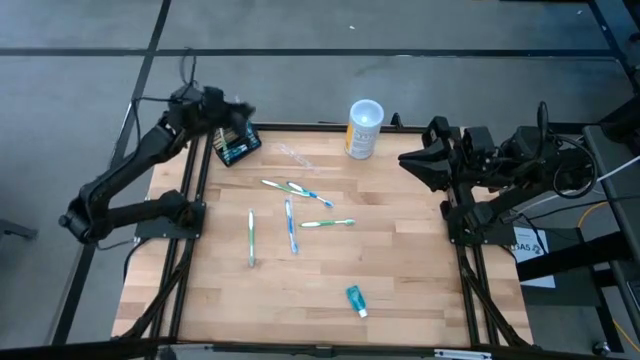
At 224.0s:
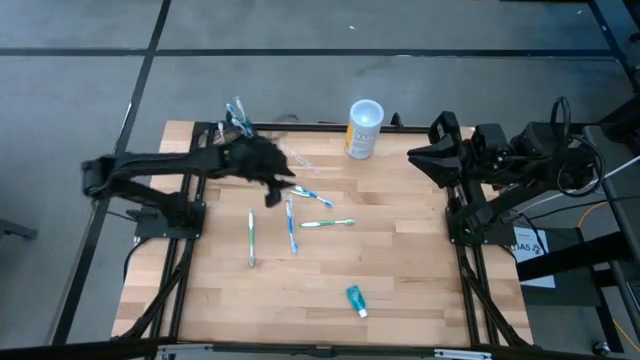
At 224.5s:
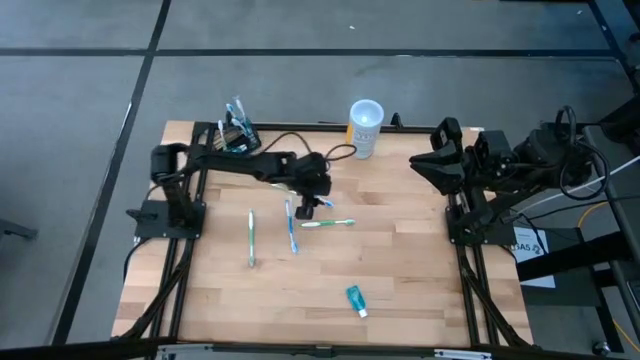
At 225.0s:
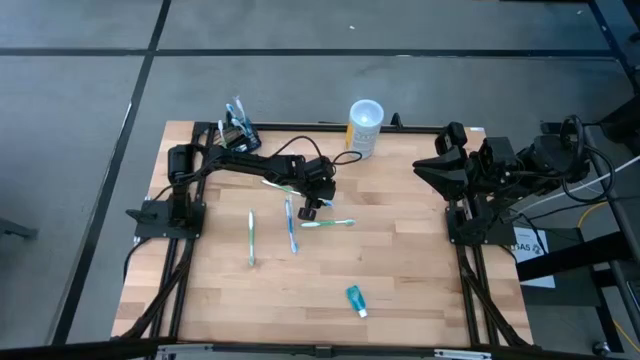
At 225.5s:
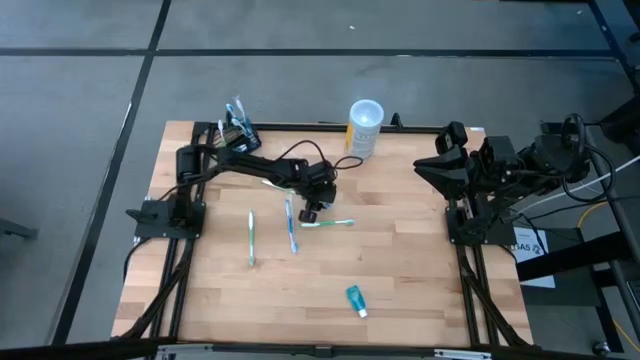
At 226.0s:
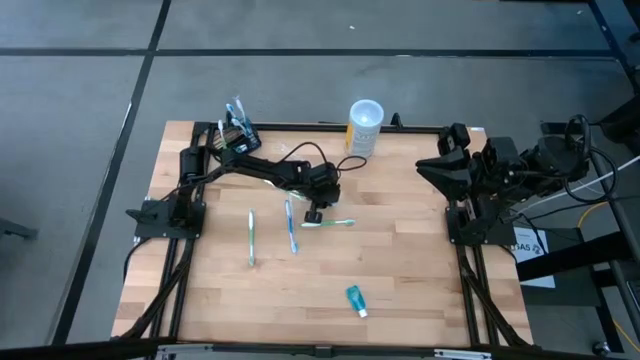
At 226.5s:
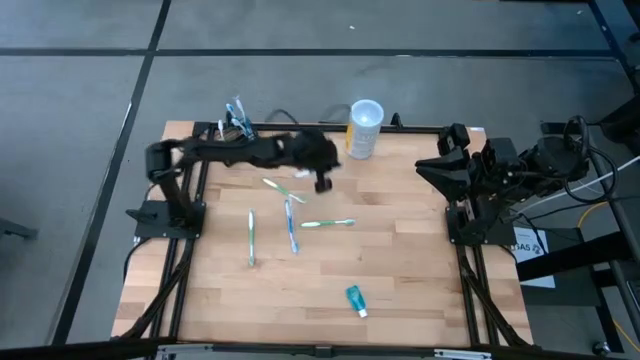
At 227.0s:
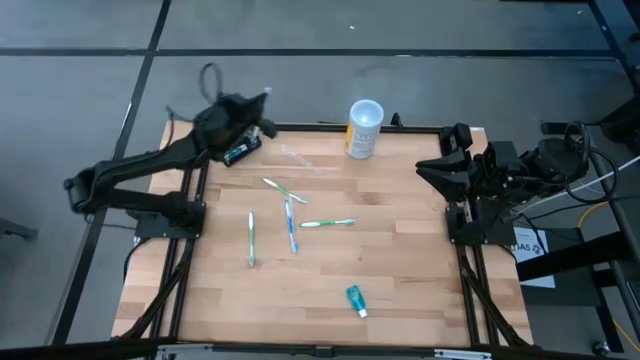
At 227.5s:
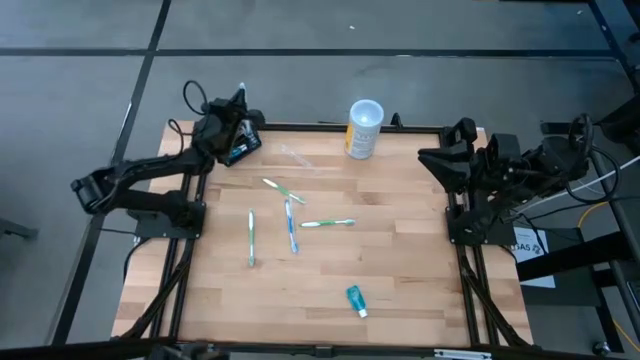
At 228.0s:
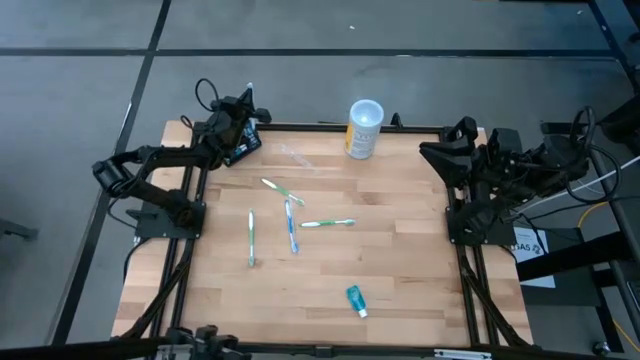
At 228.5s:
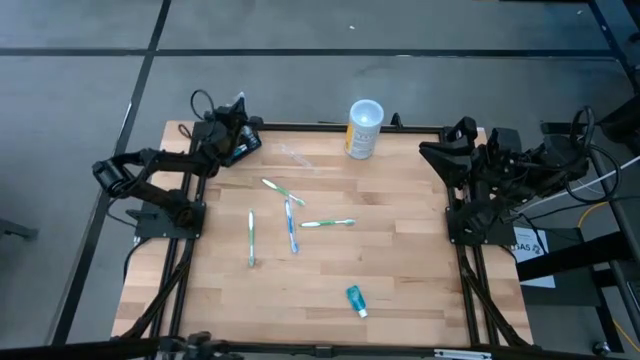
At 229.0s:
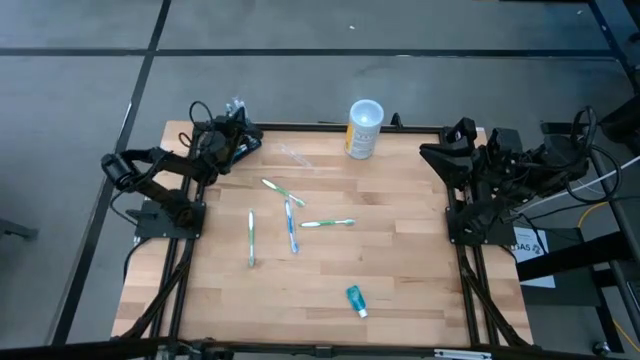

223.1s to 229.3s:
Task: Pick & Place toothbrushing station
Put the blue toothbrush into the right section of the black organizer

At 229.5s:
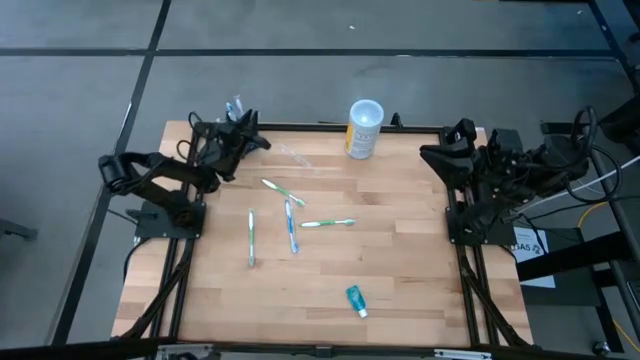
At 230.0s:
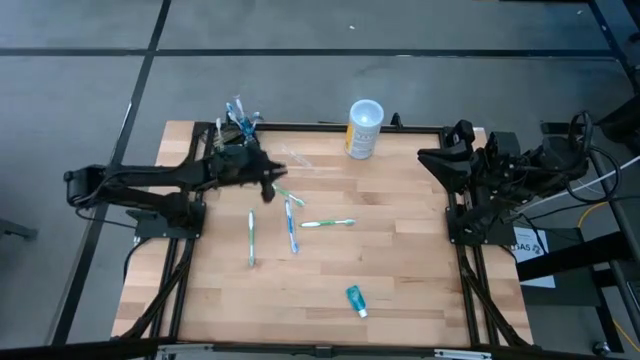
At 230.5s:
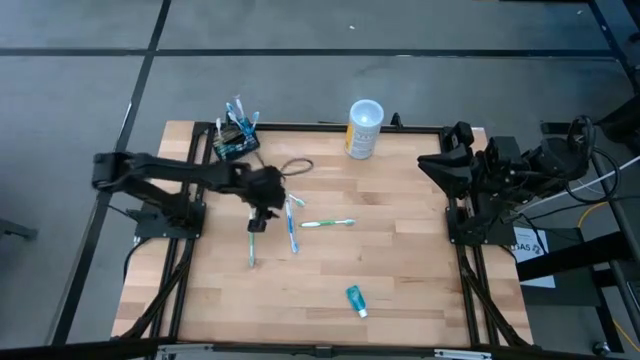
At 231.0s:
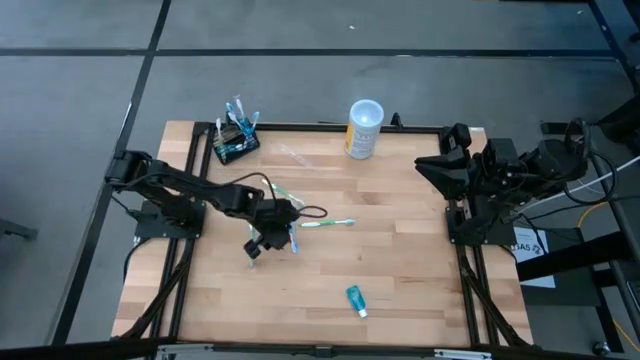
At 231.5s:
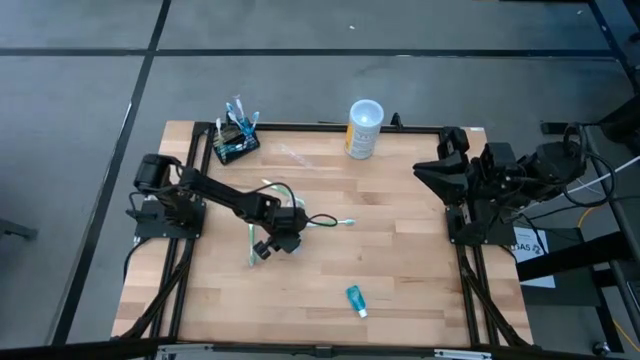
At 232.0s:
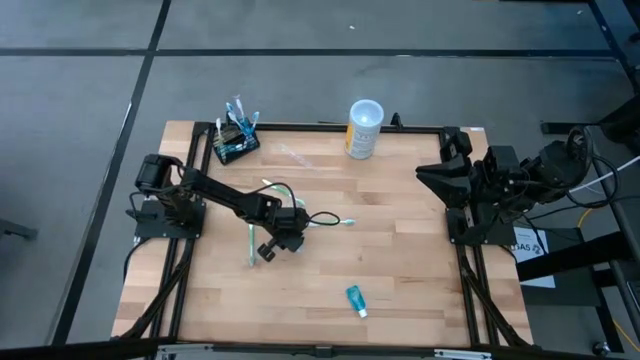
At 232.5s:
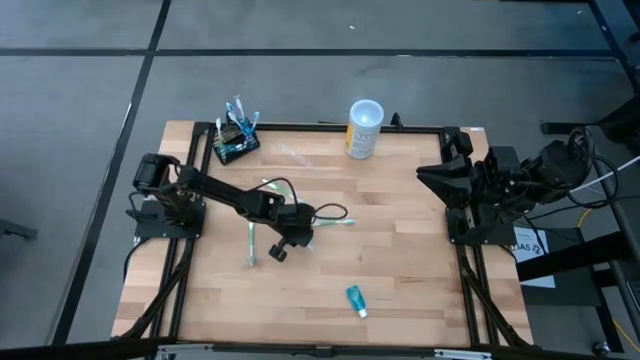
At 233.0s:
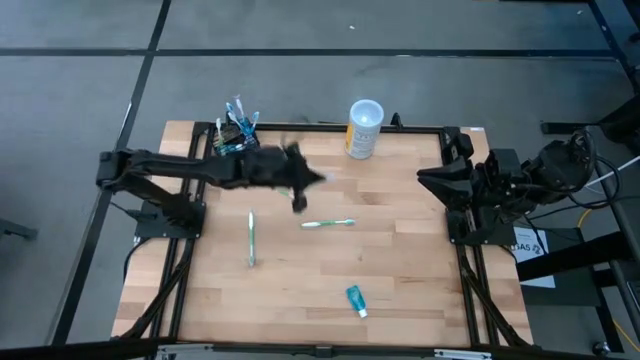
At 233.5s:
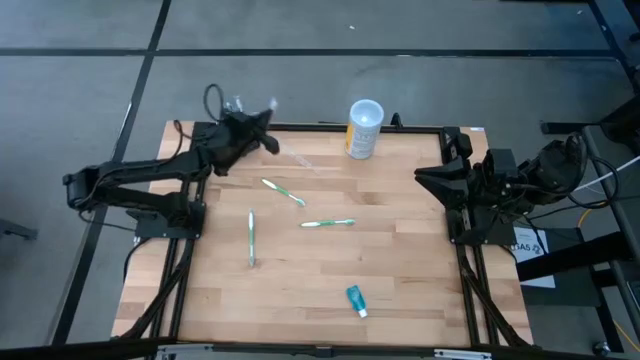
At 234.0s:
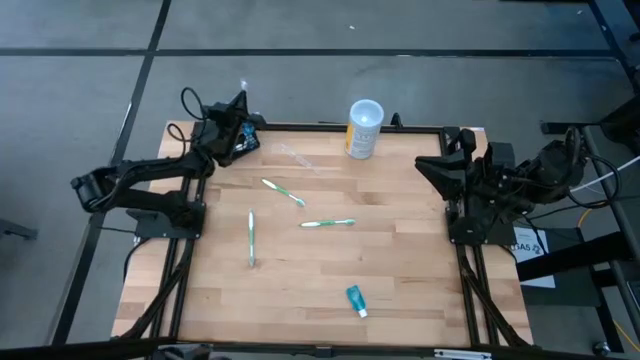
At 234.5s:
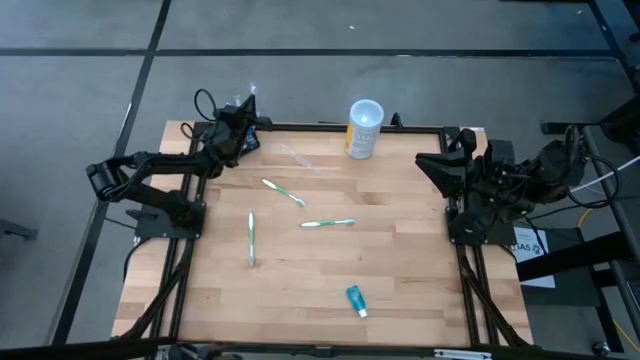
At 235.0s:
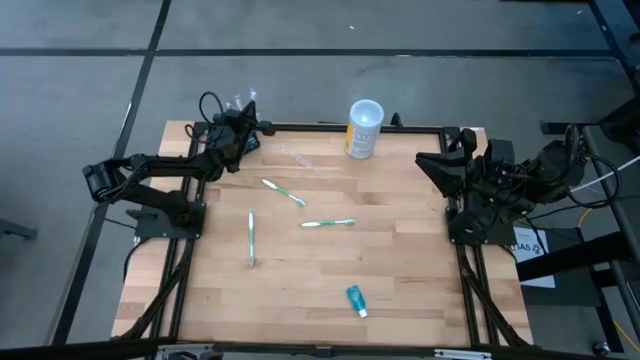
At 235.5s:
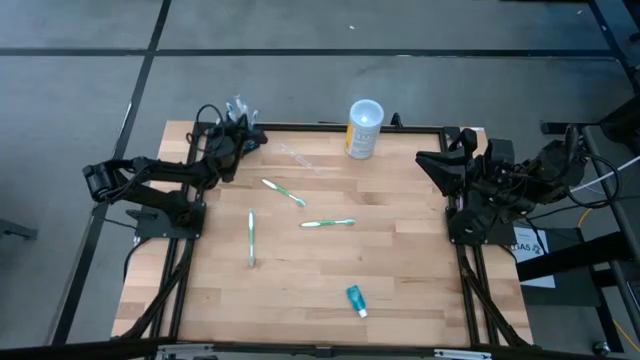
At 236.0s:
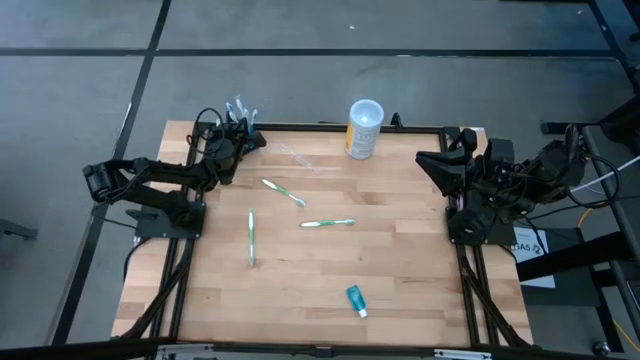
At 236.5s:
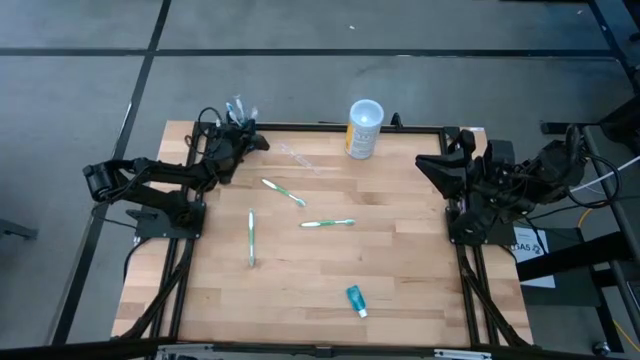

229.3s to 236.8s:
Put the blue toothbrush into the right section of the black organizer

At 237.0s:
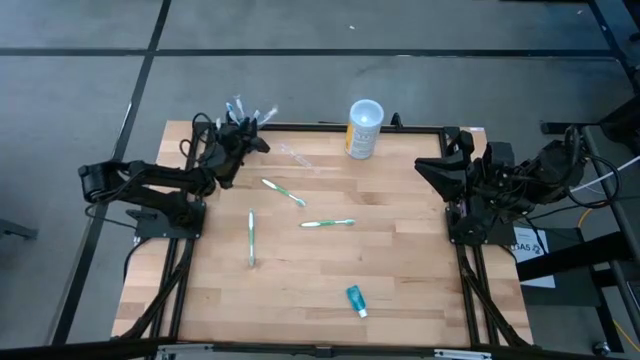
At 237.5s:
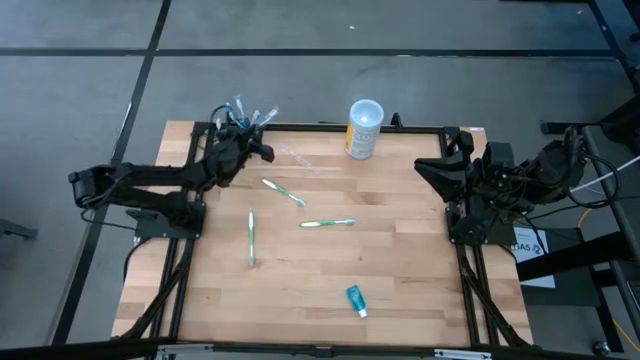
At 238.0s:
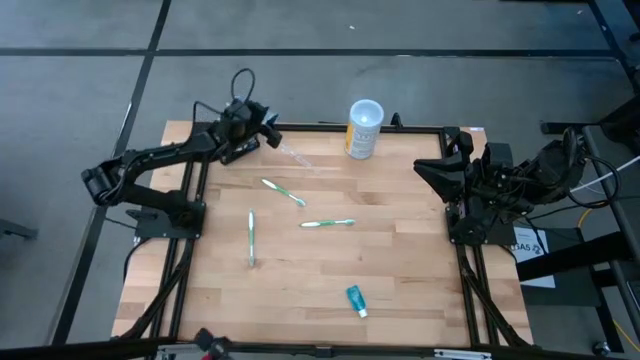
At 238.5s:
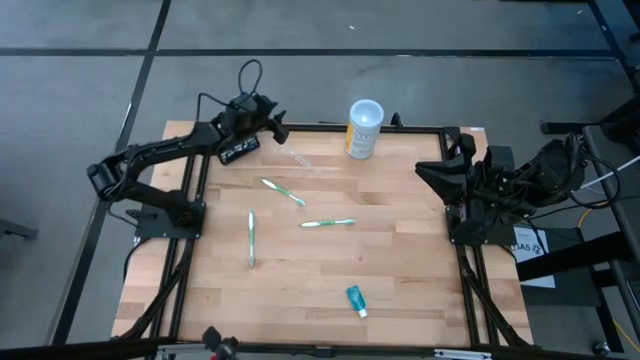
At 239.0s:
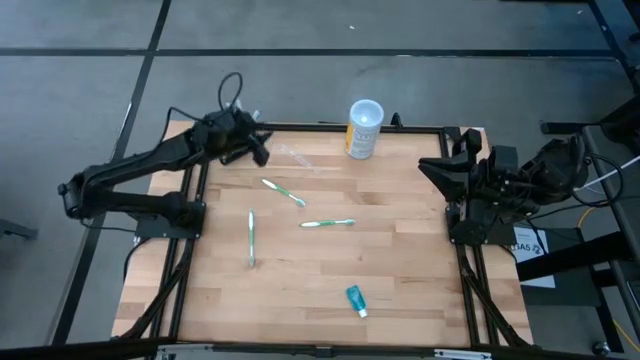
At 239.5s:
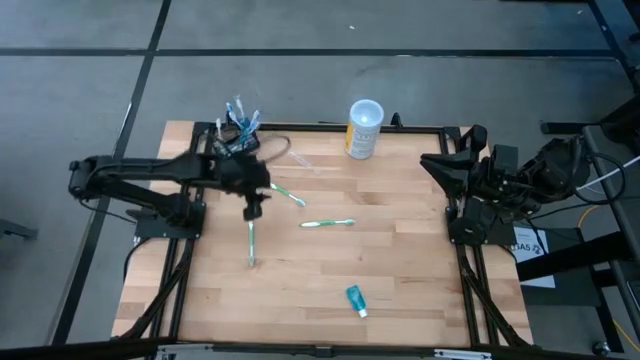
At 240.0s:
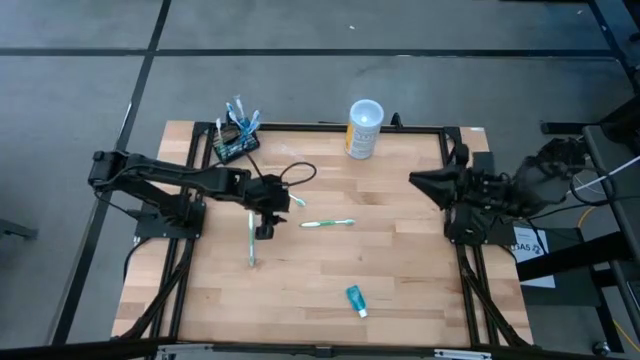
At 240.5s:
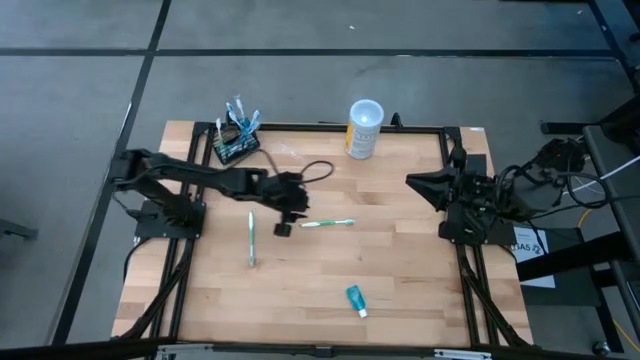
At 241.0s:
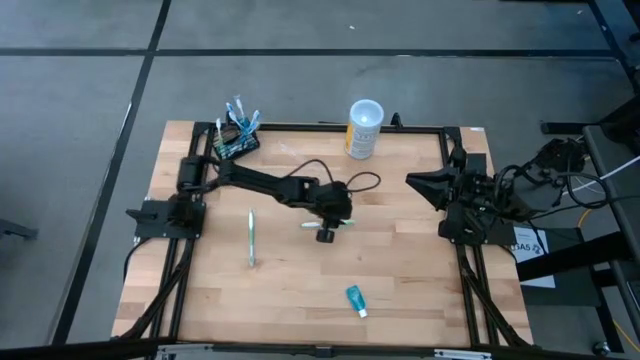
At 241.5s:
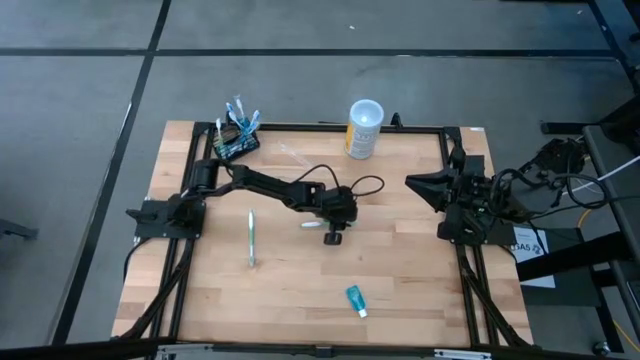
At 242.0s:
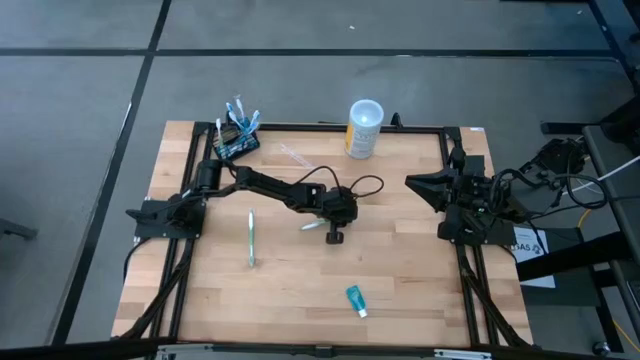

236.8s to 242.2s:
Put the green toothbrush into the left section of the black organizer

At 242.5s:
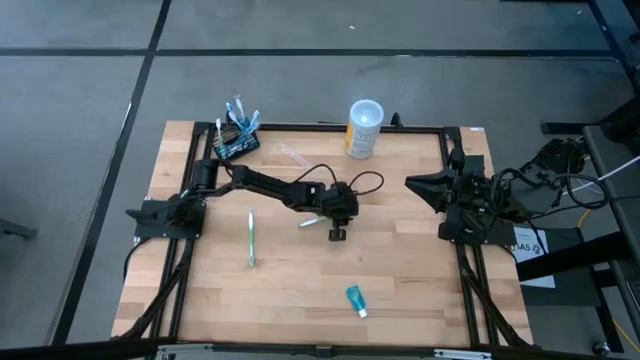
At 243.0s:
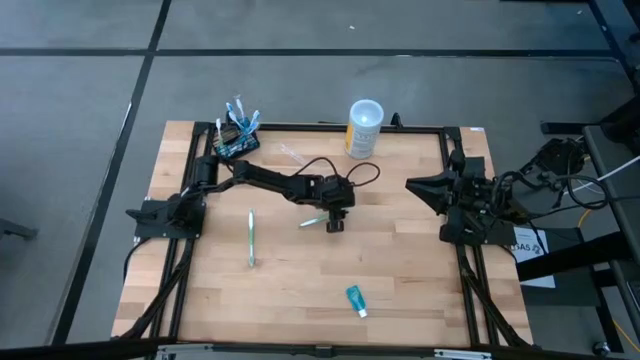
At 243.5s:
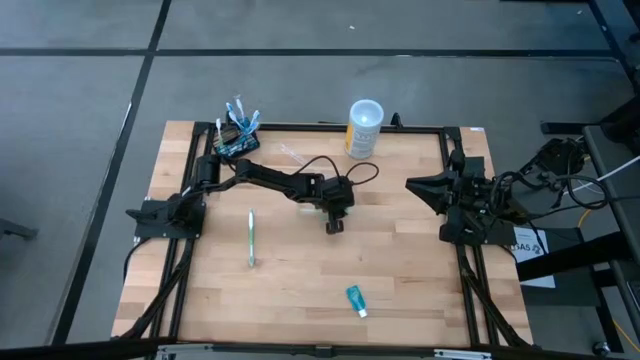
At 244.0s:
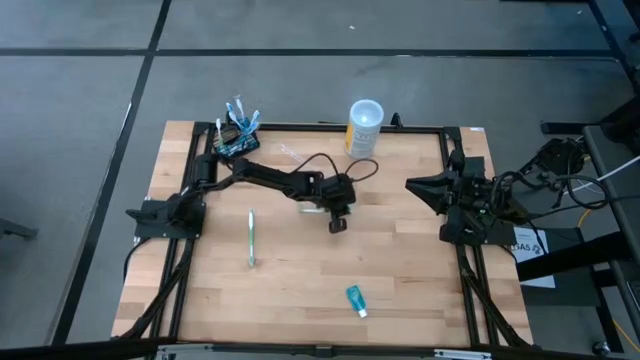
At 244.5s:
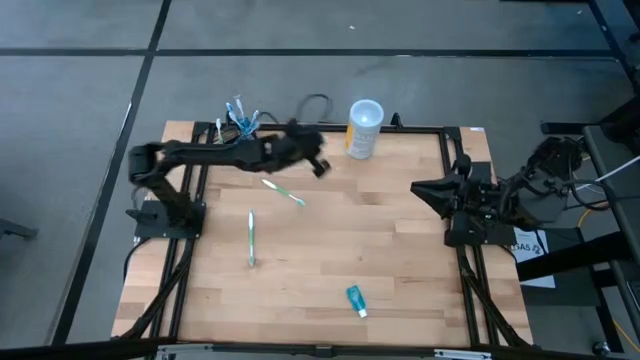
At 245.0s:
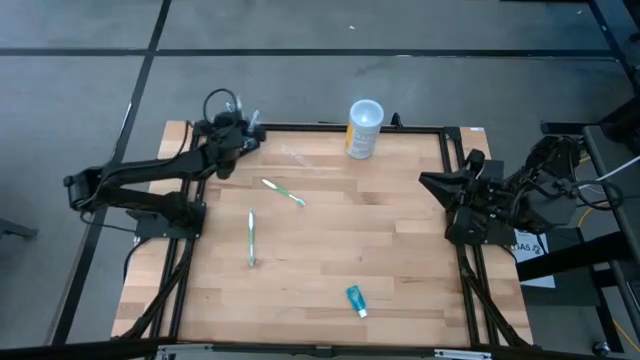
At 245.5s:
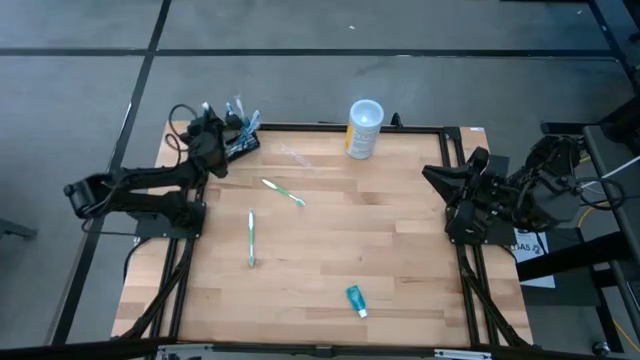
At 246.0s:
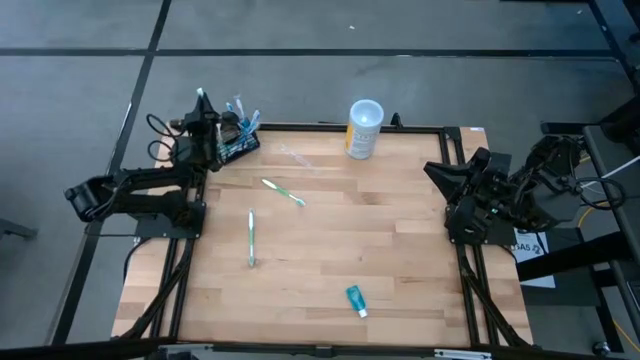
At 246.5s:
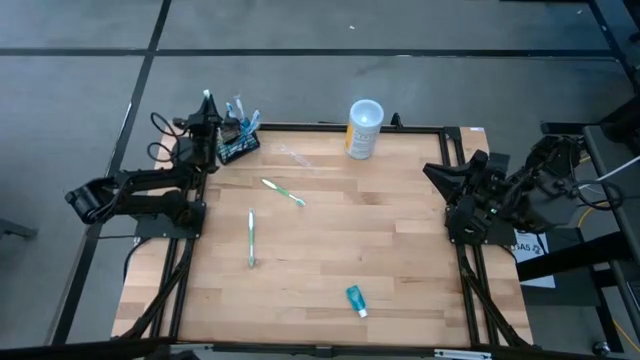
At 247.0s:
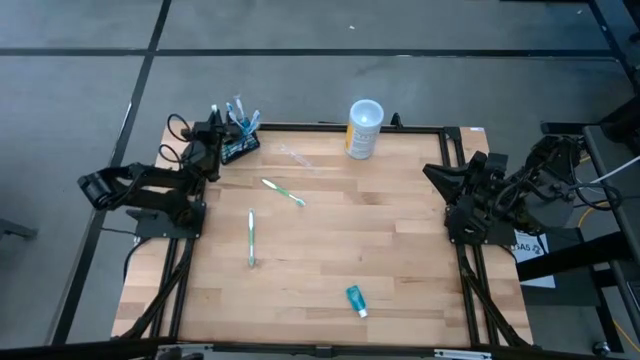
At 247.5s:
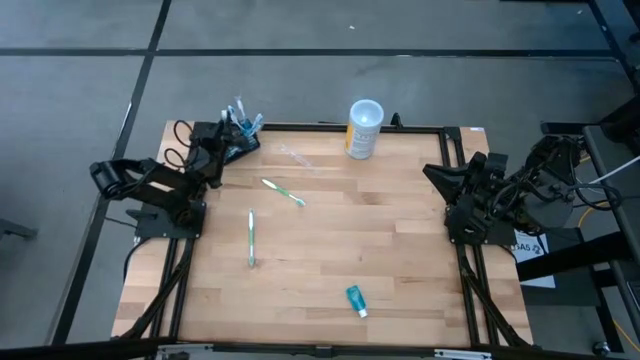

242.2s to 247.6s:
Put the green toothbrush into the left section of the black organizer
